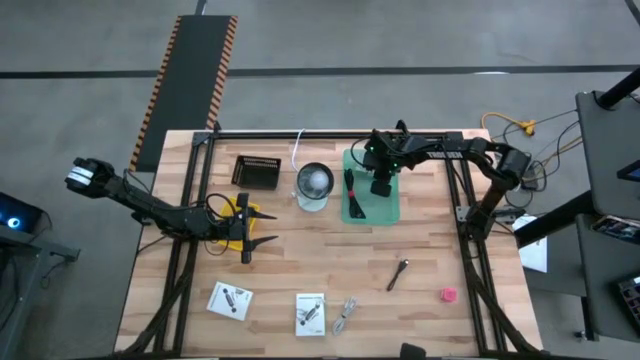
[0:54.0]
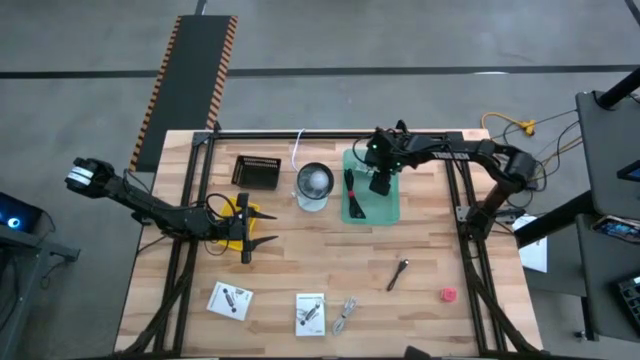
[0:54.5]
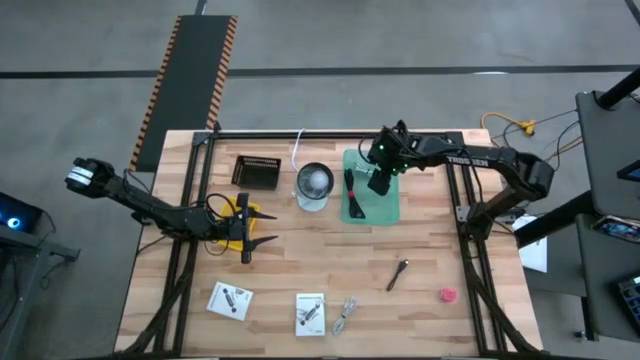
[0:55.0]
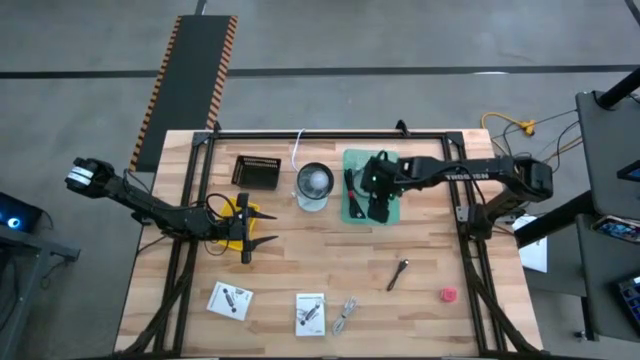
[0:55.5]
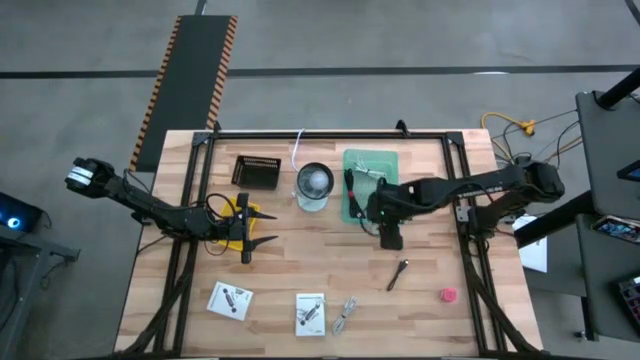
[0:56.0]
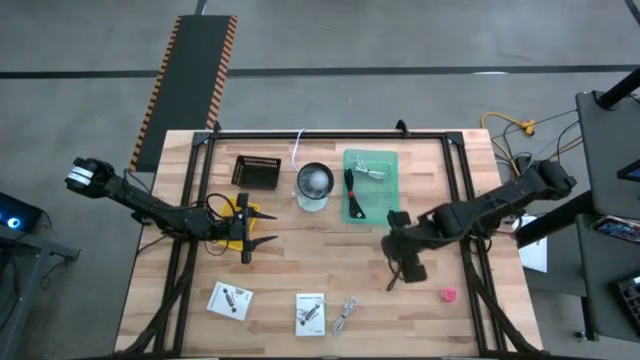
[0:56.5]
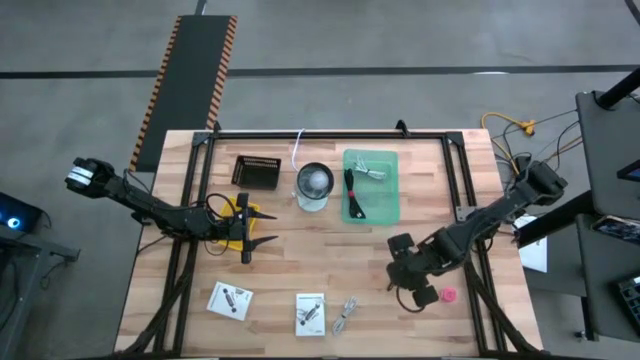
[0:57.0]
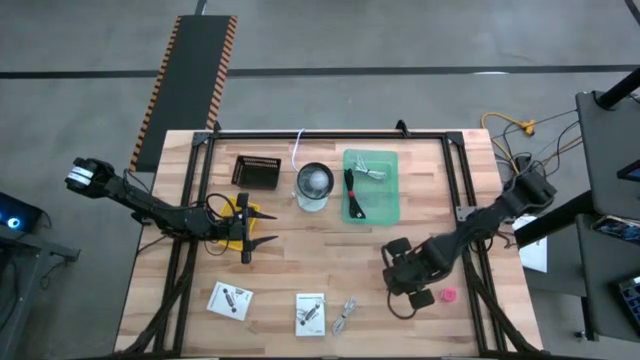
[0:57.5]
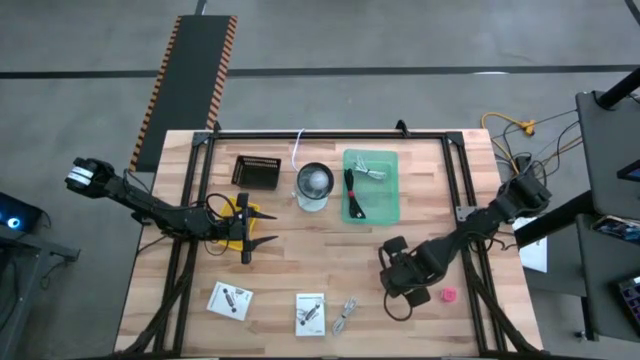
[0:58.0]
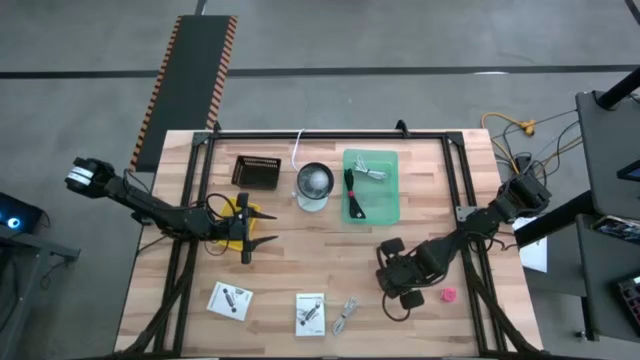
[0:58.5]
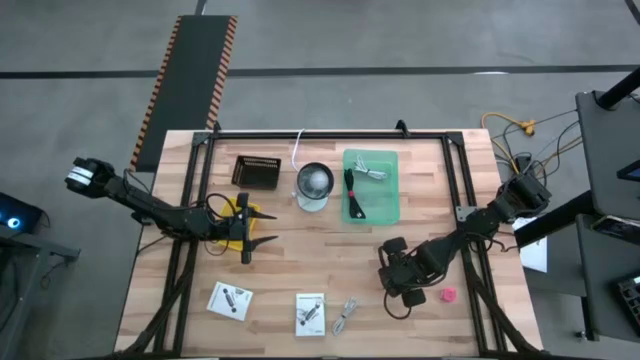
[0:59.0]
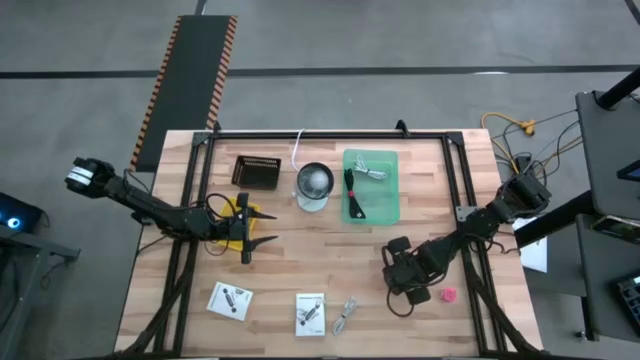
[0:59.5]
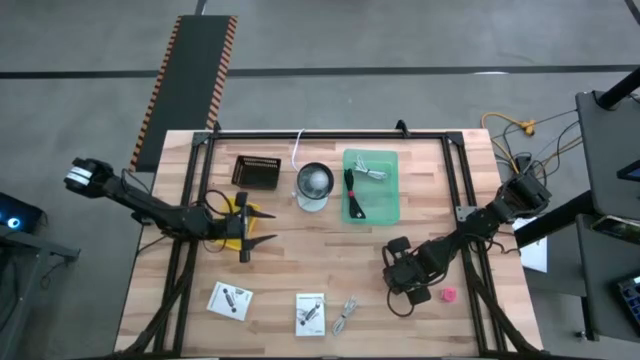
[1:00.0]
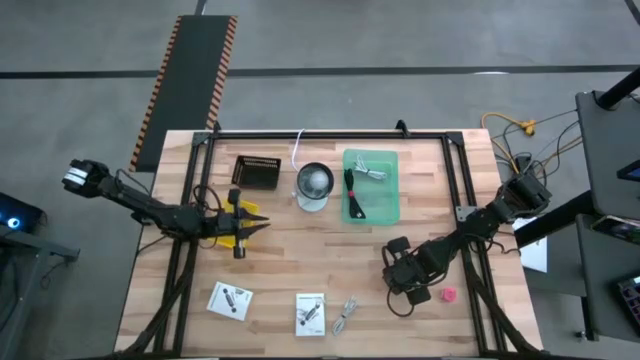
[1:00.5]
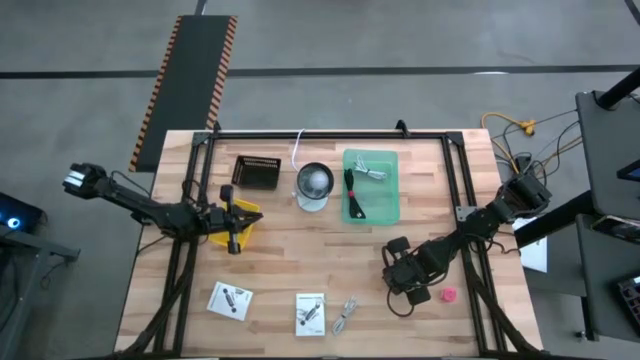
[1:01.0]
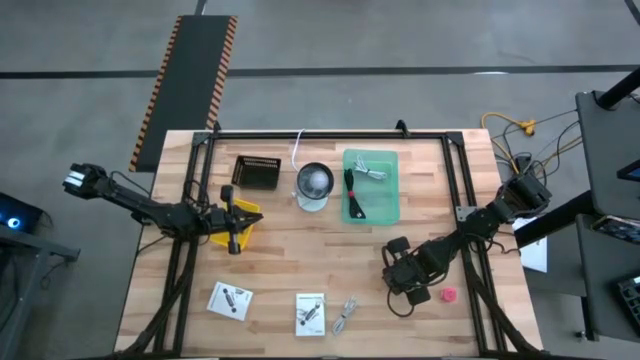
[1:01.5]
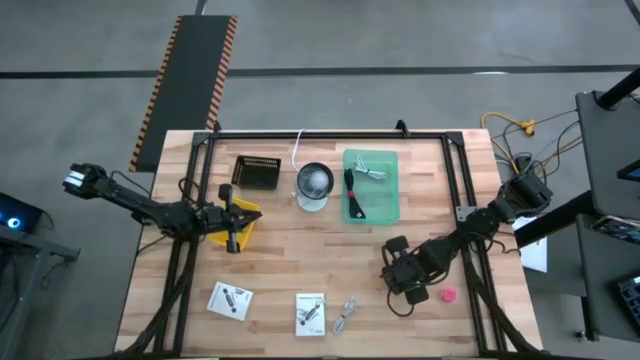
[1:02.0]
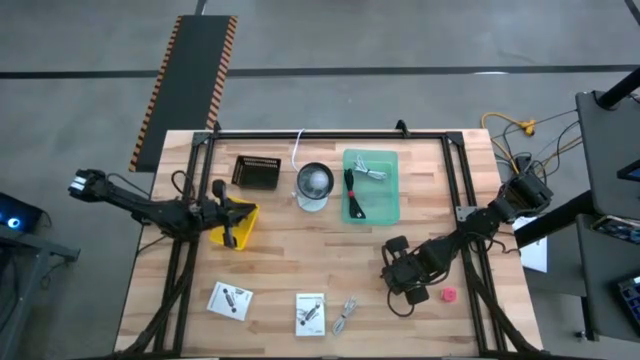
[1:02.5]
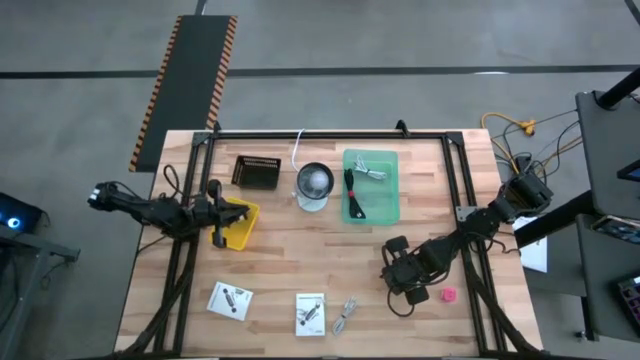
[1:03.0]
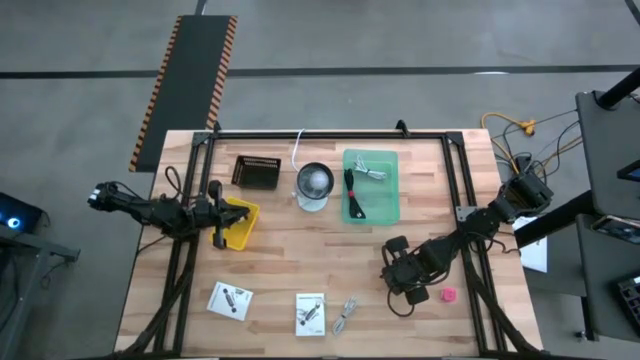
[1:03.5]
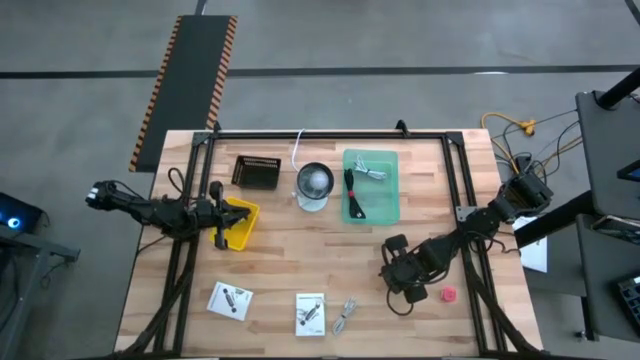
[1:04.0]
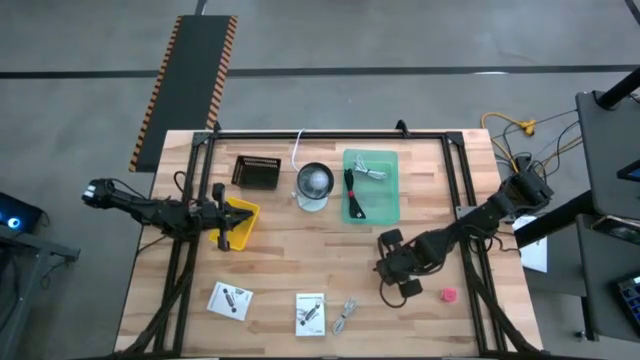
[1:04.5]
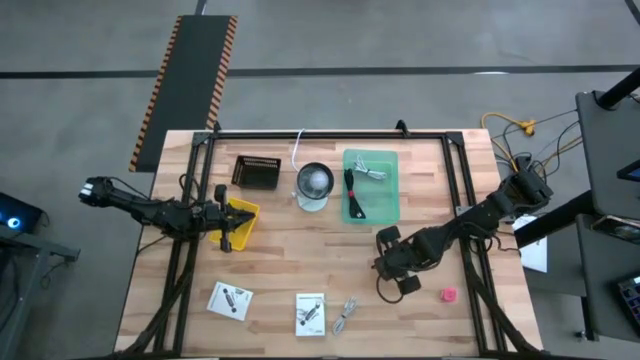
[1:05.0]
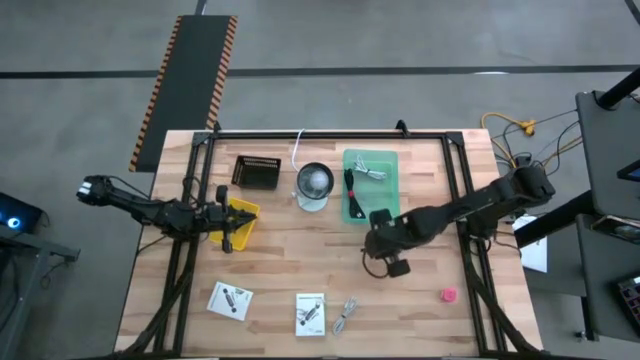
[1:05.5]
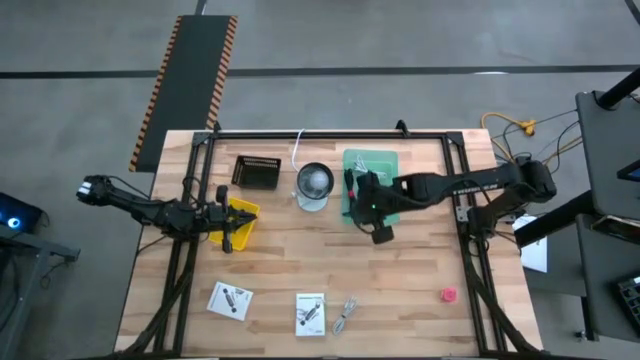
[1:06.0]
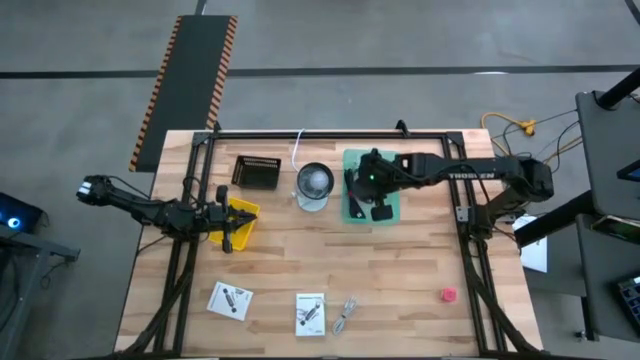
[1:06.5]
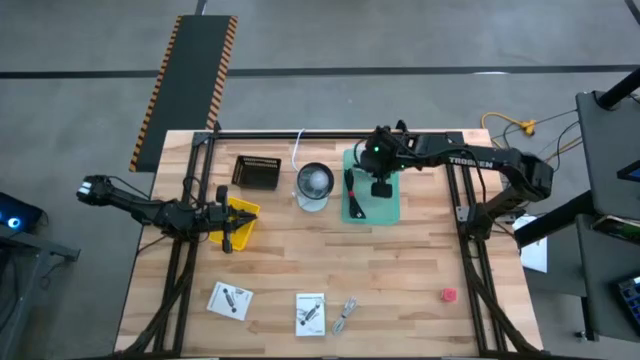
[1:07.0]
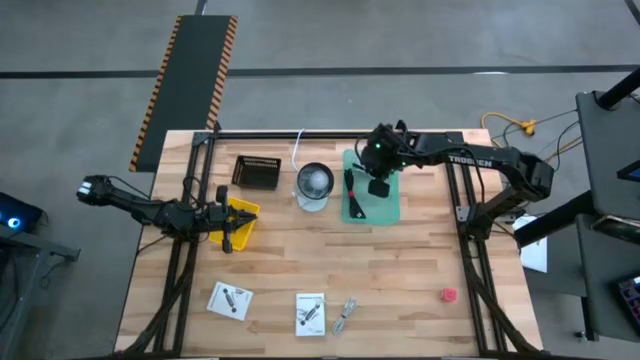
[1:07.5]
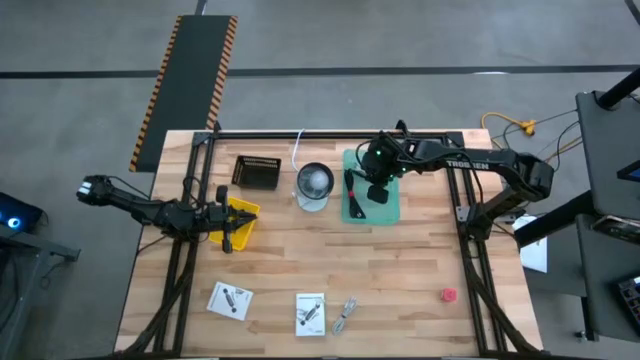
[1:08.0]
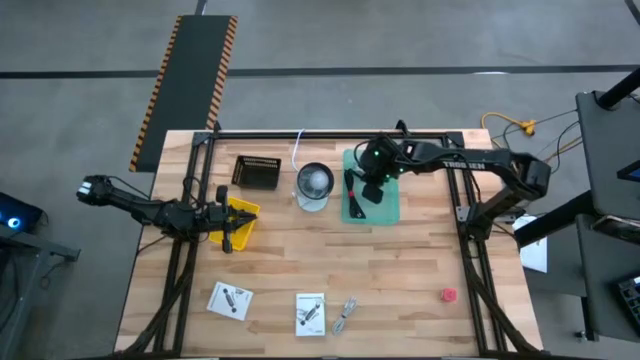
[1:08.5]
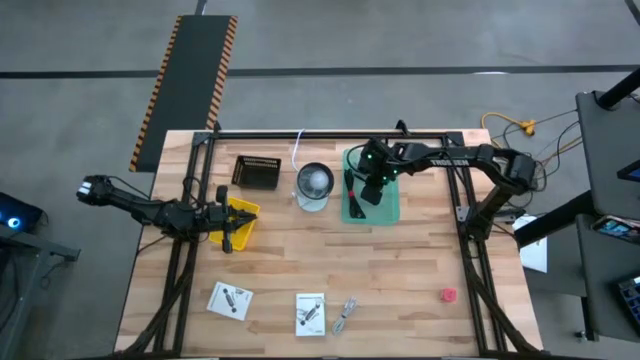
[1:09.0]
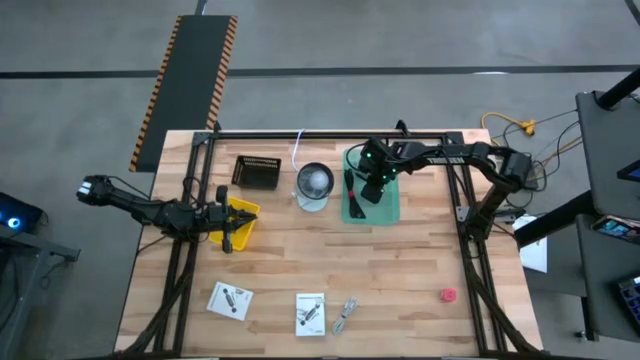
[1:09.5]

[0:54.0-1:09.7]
Task: Pick and place items into bin
Put the black charger cable into the green bin

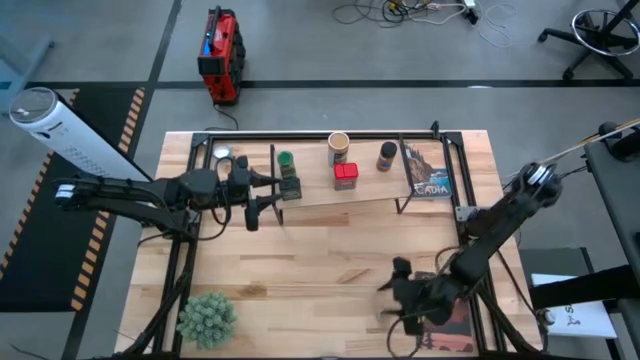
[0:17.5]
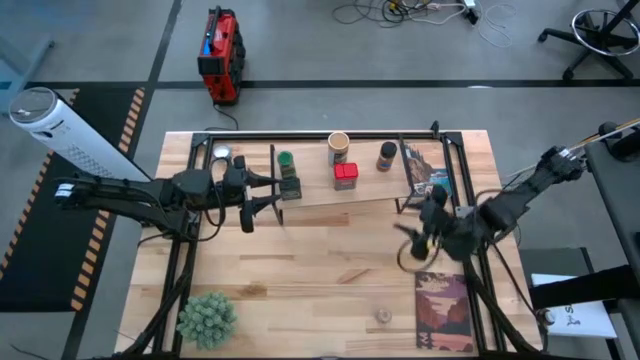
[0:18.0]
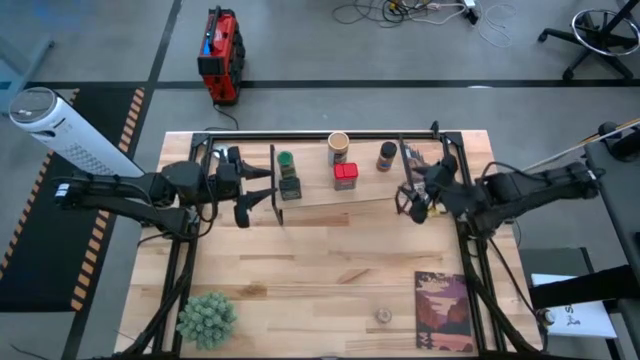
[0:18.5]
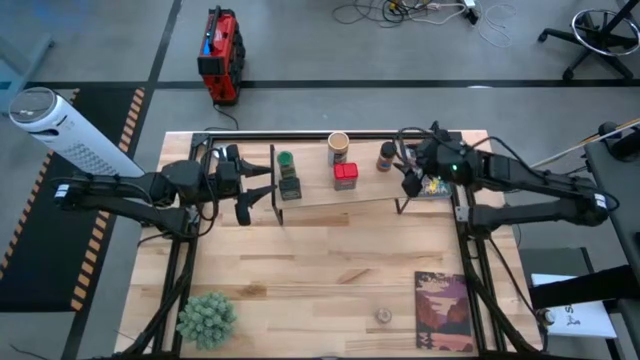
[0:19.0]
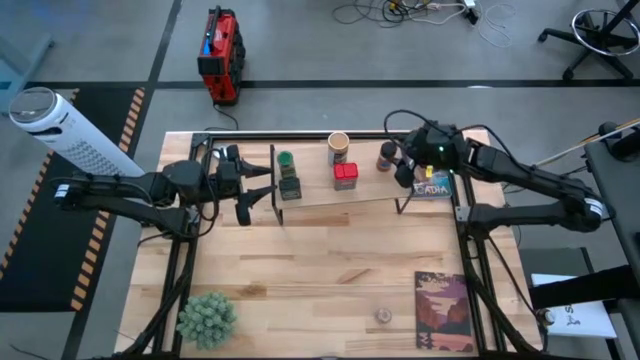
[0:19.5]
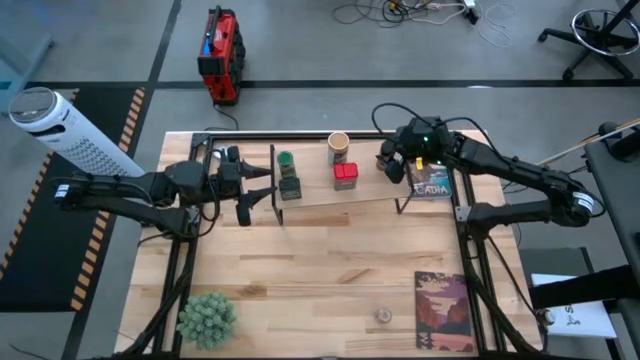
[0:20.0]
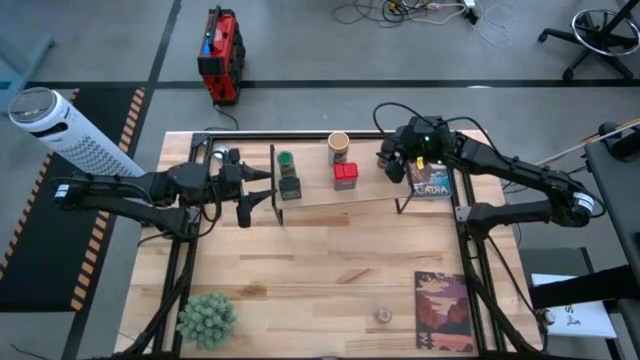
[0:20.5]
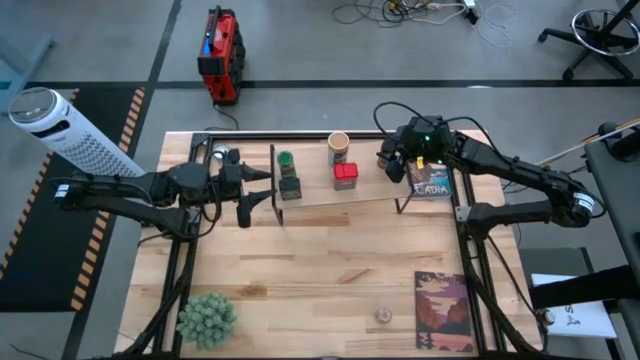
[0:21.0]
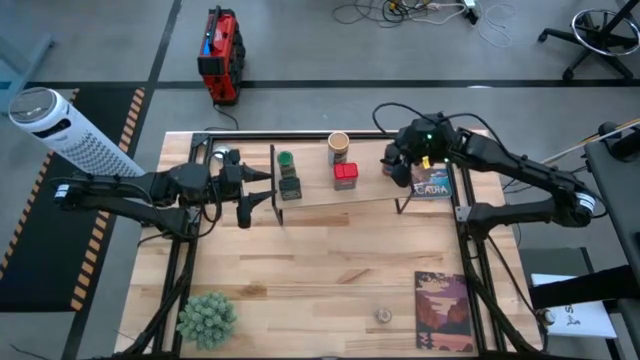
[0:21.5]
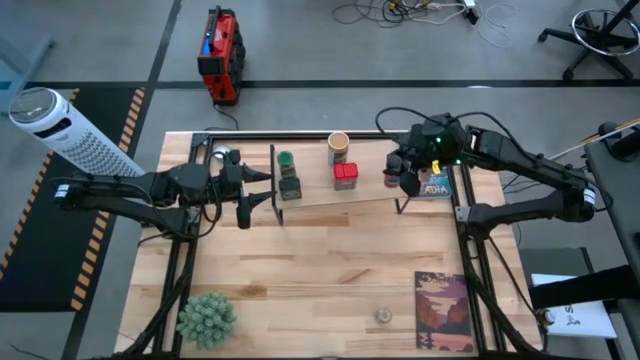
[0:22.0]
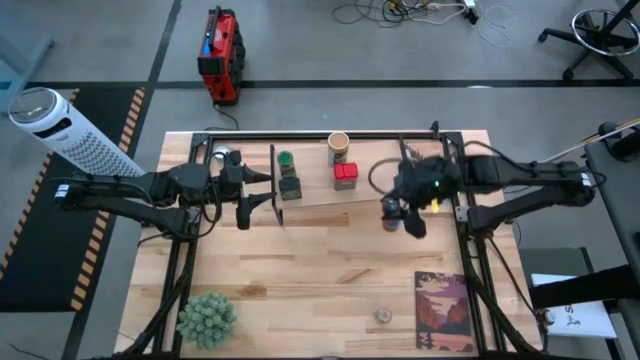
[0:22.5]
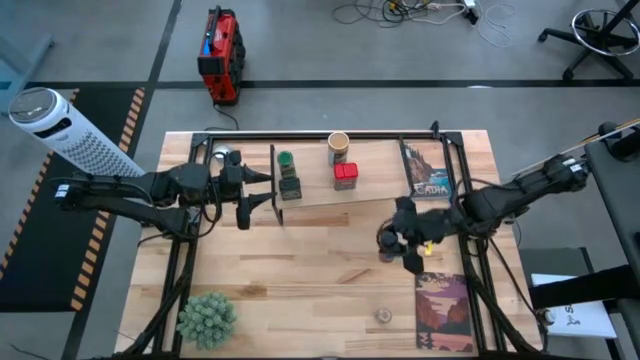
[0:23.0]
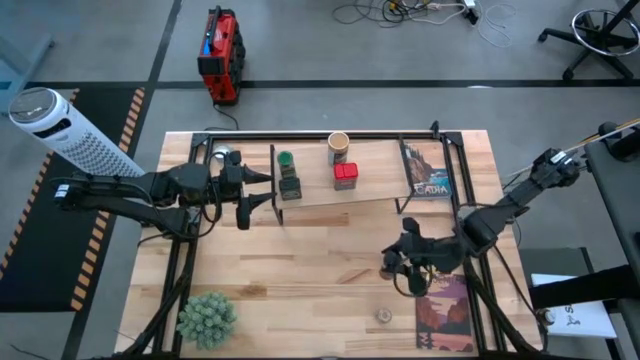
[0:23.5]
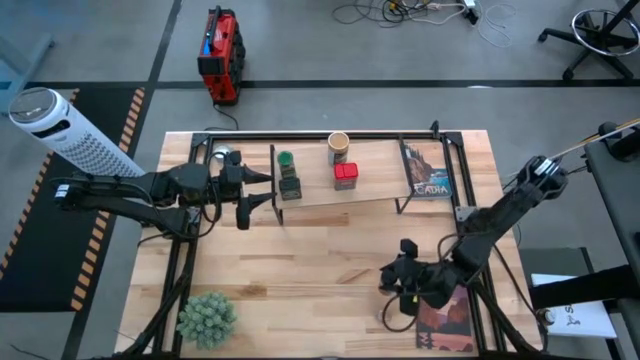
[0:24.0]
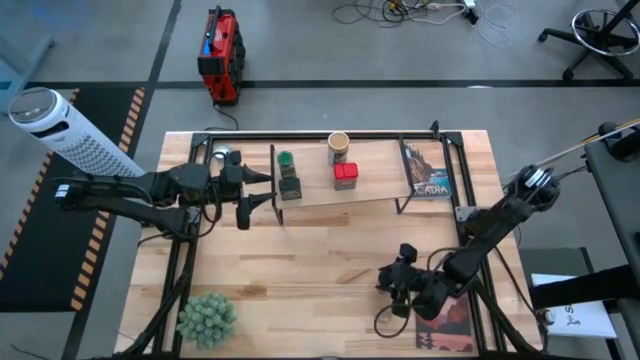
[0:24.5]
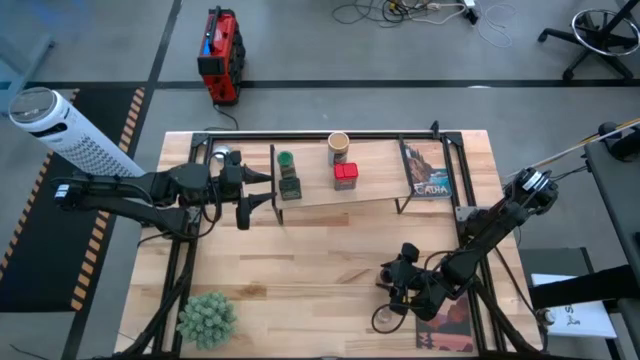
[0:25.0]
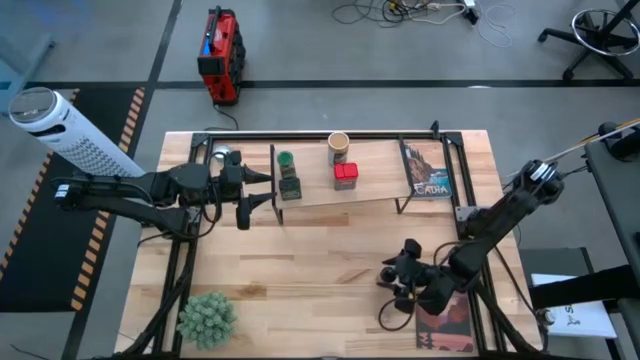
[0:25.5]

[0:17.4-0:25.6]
Task: Shelf spices
Remove the orange seasoning bottle from the shelf
